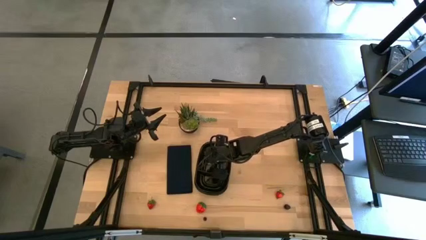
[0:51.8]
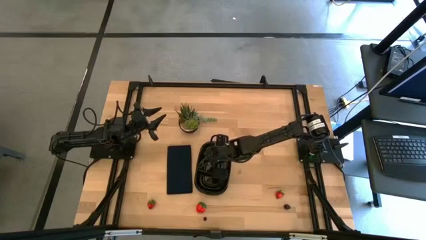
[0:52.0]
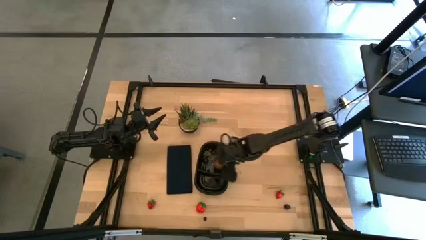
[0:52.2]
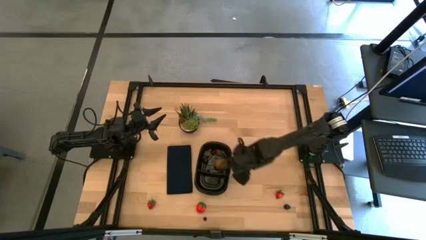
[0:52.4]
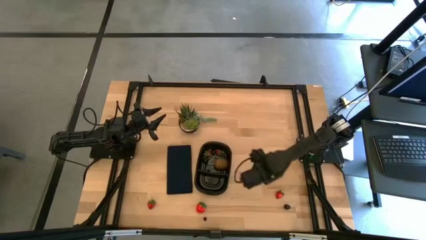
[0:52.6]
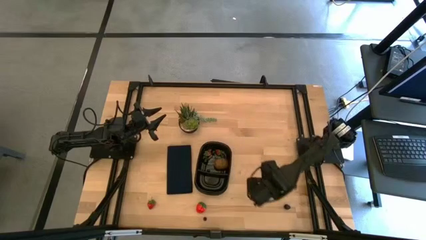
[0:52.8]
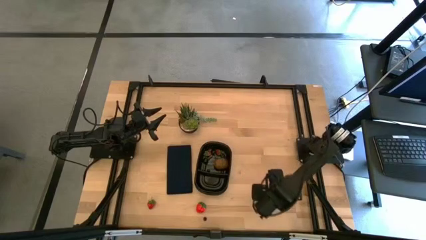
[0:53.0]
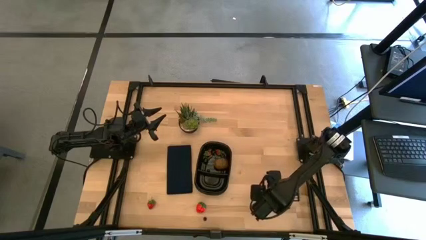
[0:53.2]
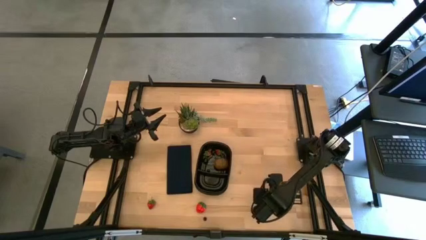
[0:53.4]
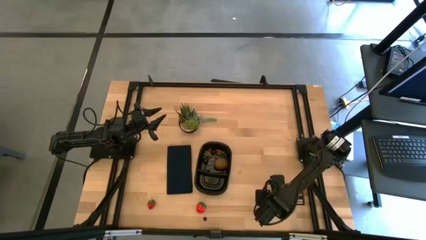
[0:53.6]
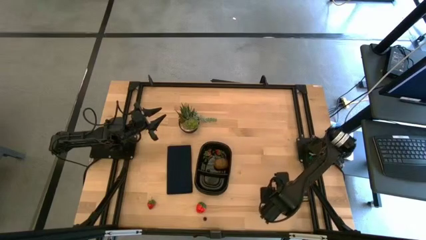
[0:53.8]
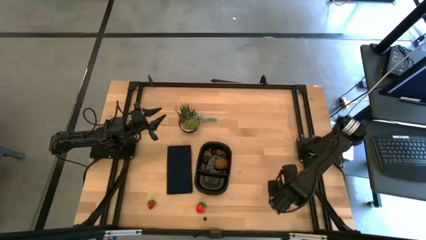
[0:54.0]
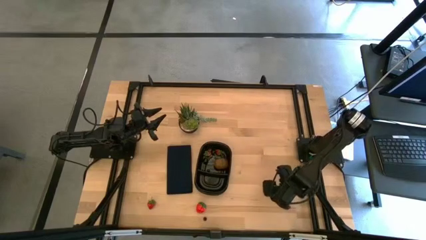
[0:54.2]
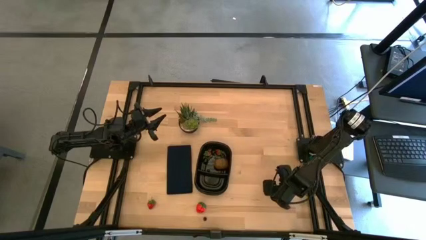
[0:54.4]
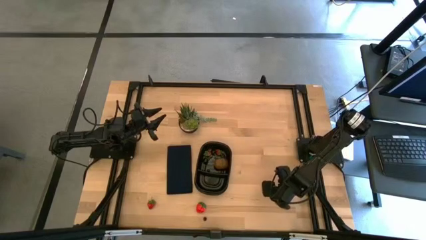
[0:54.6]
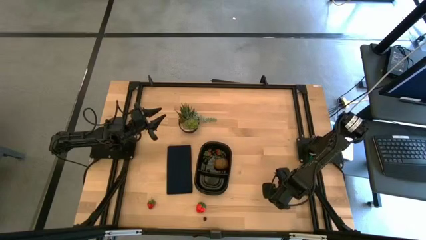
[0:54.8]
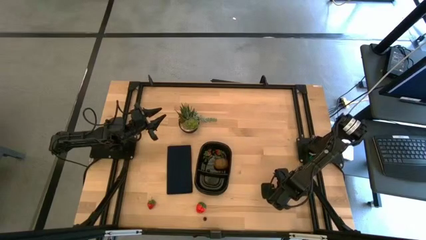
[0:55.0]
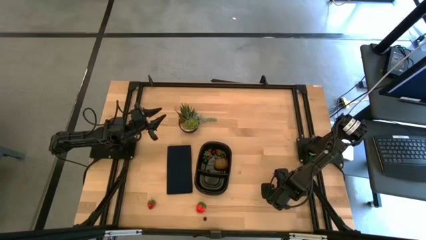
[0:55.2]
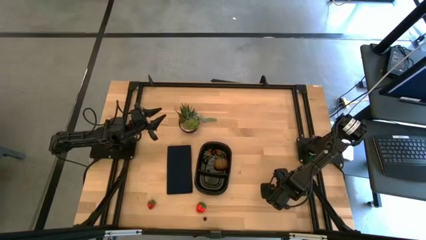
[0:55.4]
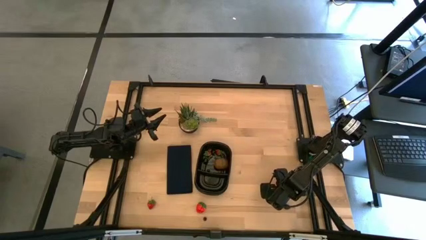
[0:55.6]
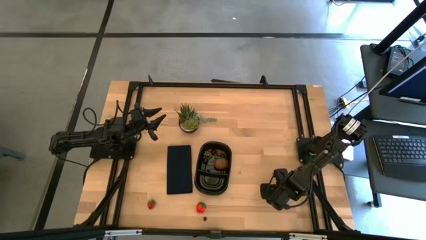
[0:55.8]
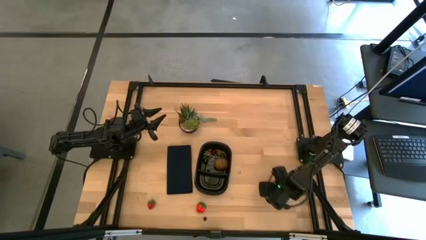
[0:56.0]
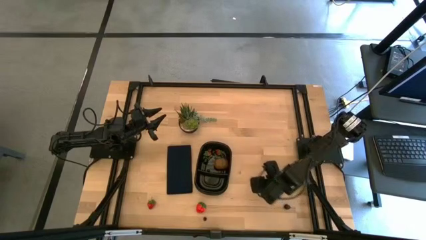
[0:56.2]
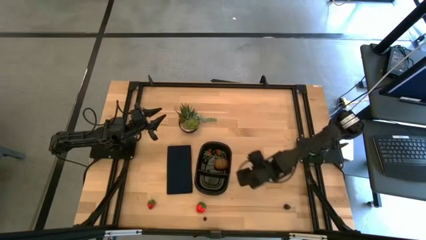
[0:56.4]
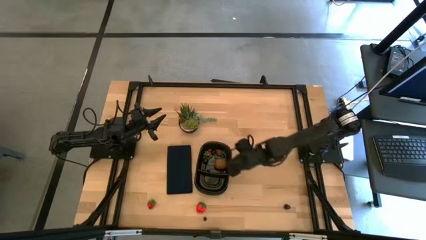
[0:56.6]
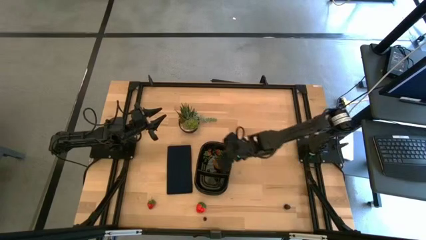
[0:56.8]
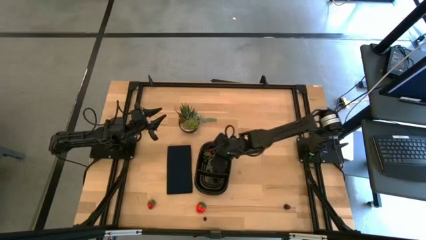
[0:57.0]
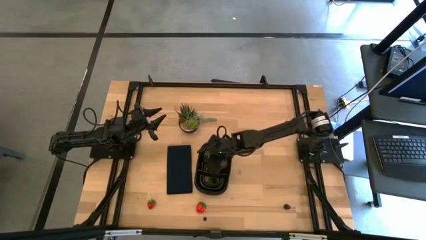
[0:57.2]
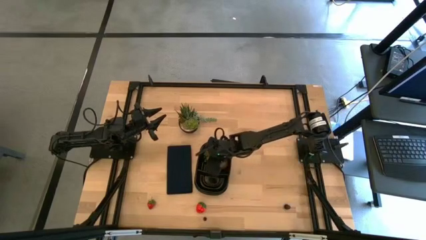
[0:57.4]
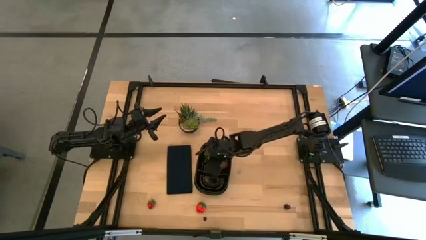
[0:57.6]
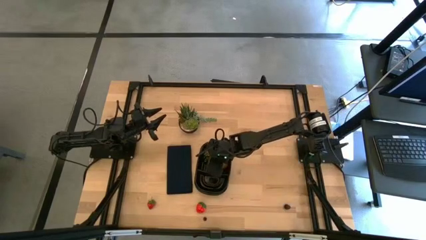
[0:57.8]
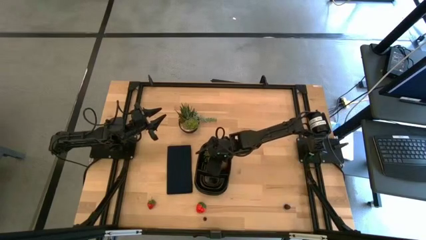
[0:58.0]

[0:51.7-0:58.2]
Task: Pick and placing Produce into tupperware
Put the red strawberry into the black bin

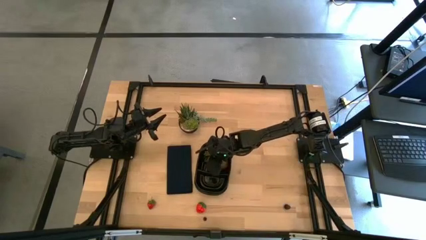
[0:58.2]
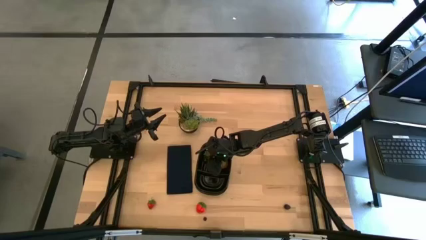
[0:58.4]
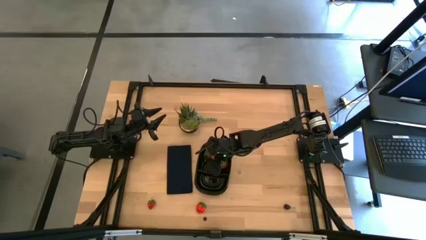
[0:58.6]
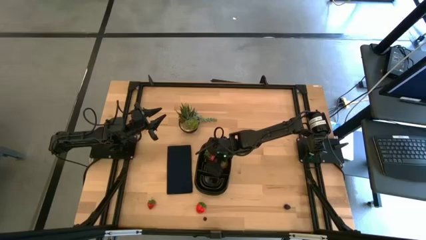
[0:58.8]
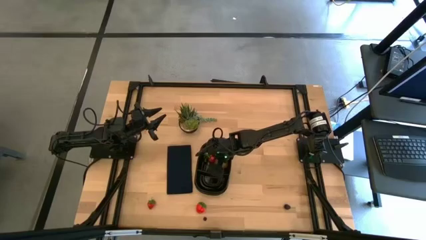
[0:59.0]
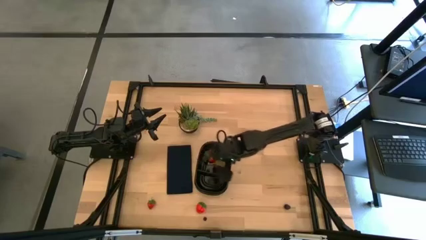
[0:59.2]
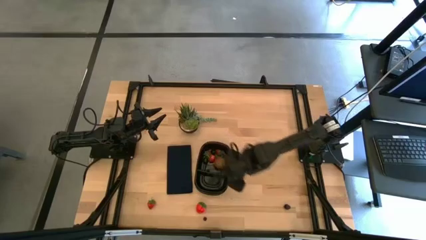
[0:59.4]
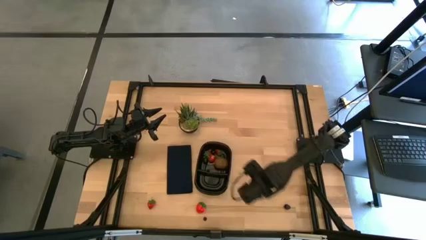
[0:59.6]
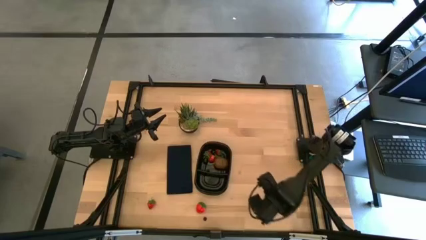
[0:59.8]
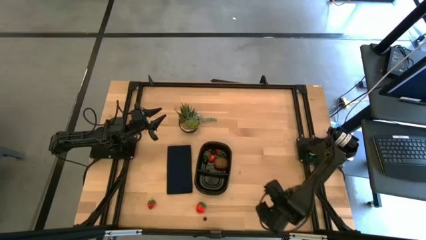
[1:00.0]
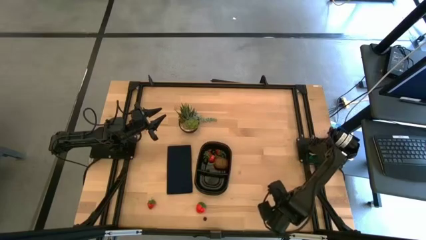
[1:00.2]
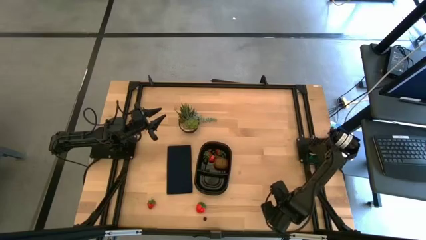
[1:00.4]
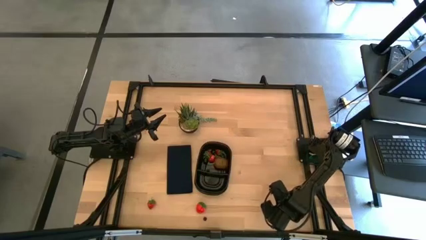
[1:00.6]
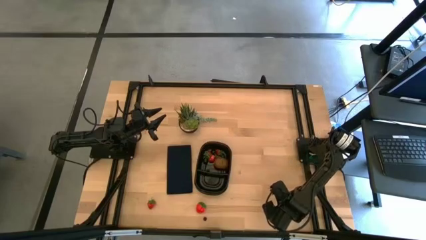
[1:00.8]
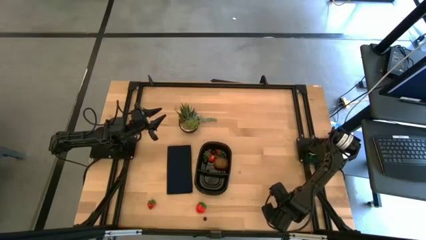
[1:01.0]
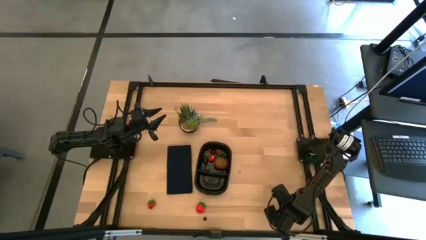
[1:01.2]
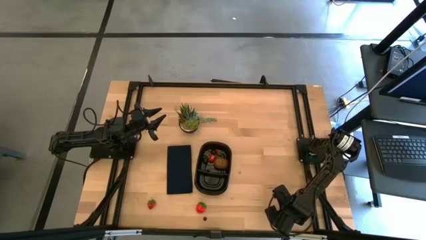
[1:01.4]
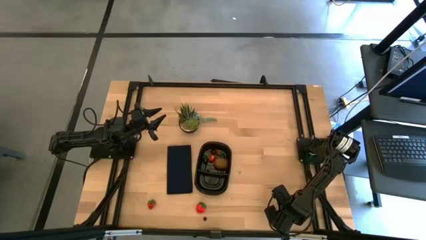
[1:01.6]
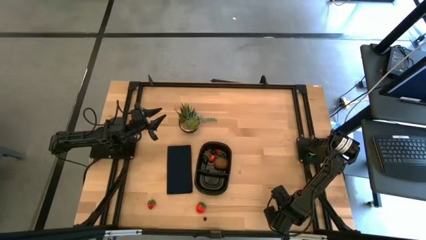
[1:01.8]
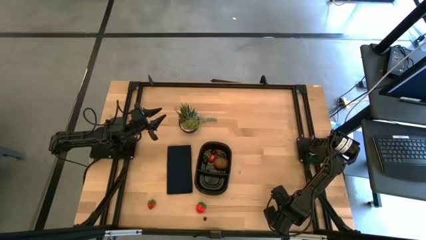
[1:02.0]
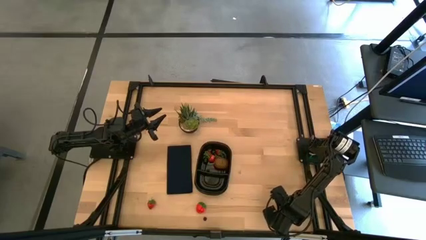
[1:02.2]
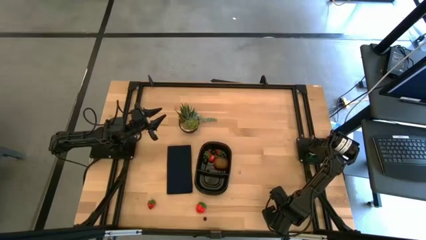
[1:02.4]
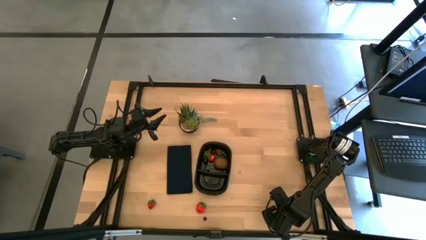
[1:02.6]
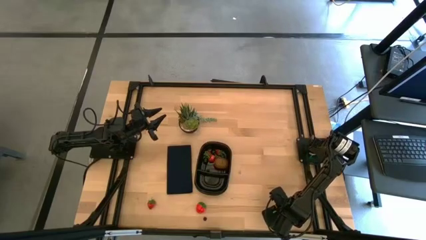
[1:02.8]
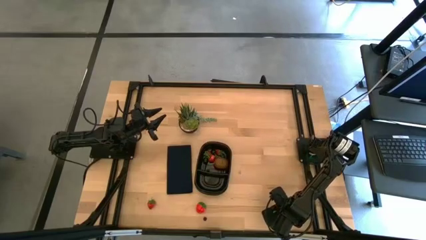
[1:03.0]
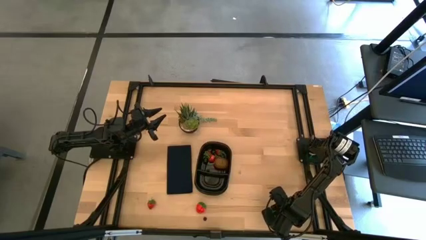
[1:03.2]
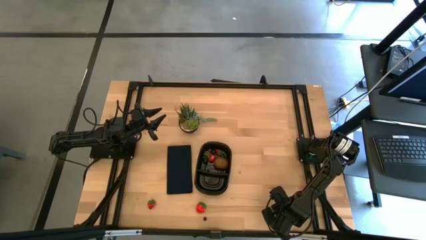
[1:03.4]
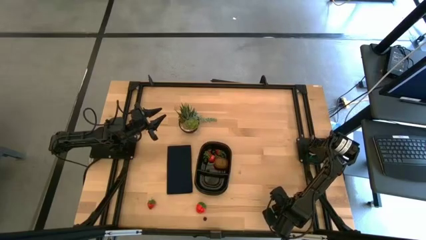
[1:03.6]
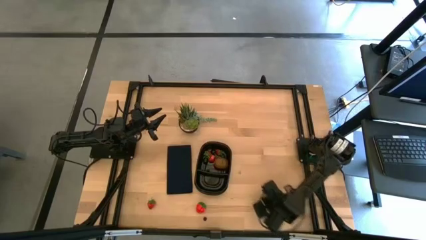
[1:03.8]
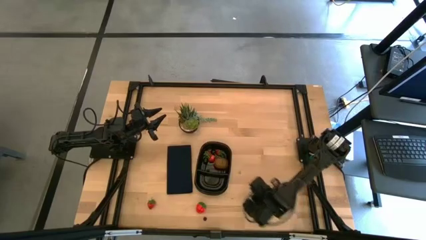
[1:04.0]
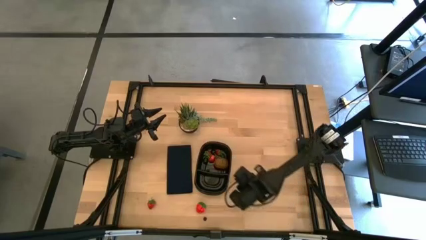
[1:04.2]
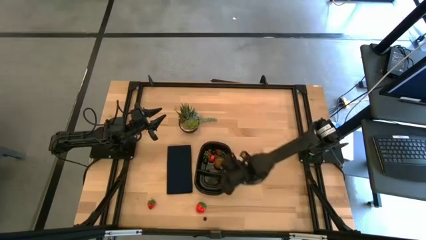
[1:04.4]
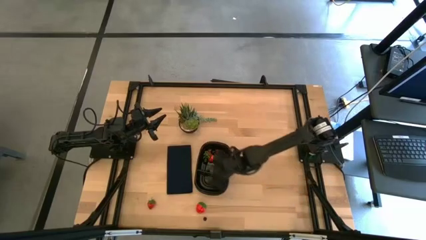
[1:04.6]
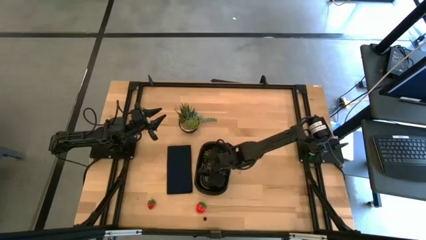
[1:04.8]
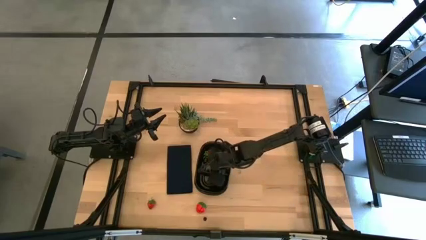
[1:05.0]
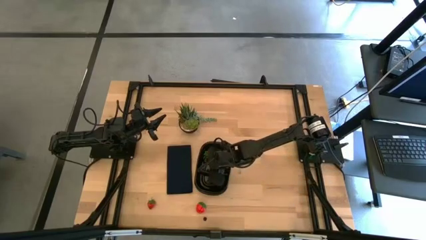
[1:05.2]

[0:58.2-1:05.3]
Put the black raspberry into the black bin

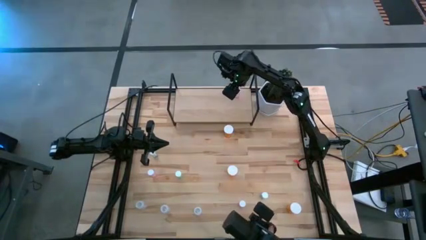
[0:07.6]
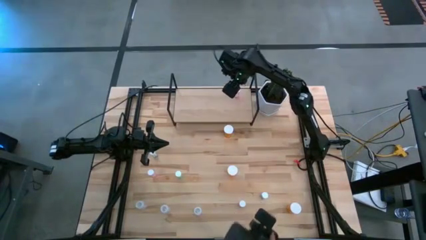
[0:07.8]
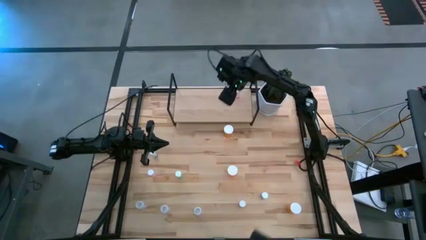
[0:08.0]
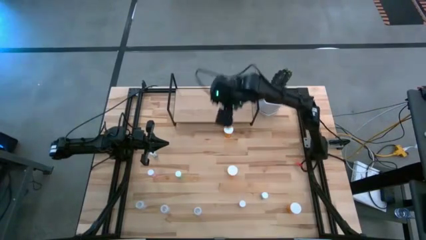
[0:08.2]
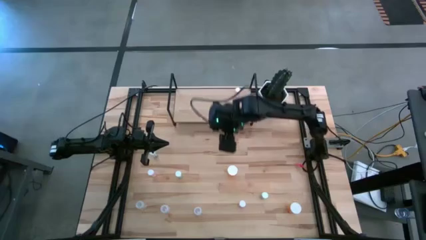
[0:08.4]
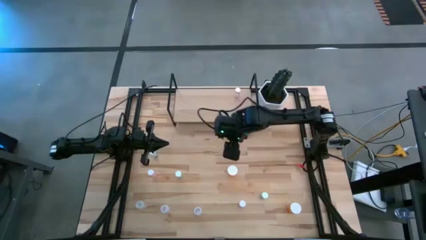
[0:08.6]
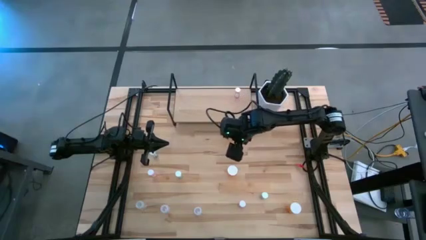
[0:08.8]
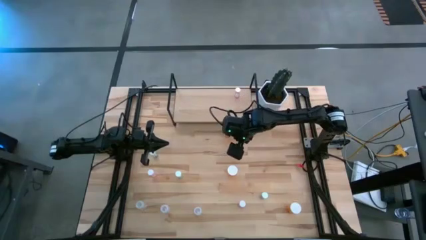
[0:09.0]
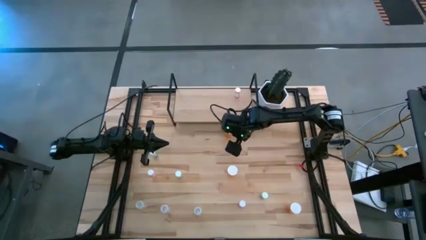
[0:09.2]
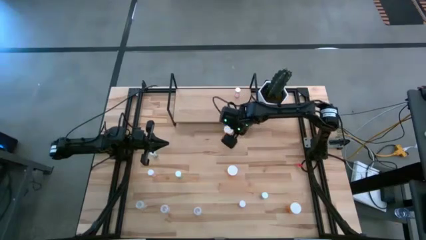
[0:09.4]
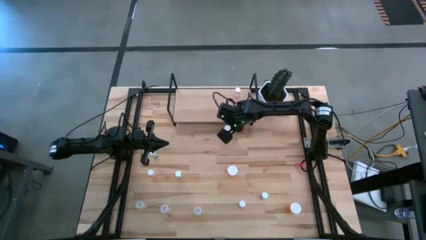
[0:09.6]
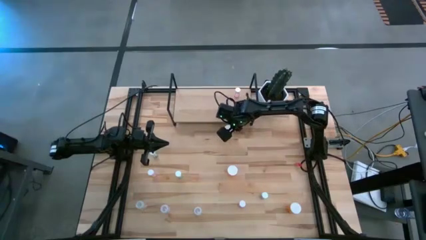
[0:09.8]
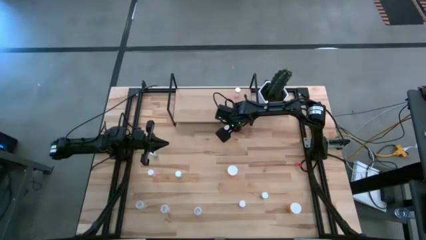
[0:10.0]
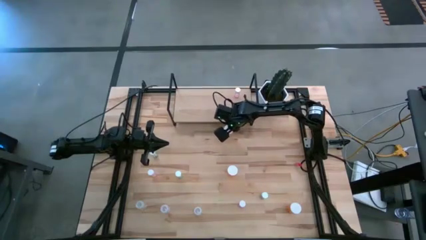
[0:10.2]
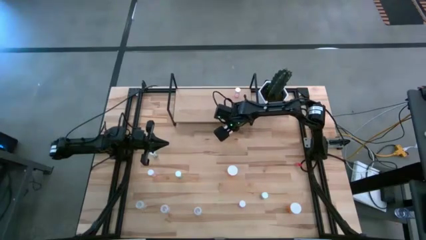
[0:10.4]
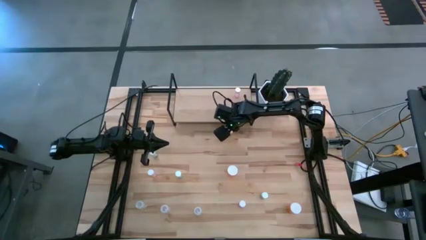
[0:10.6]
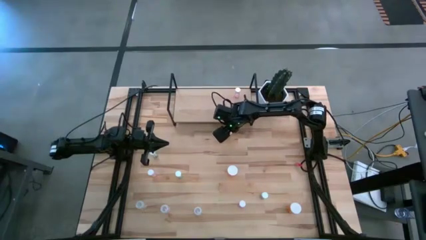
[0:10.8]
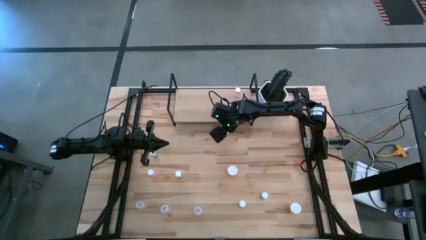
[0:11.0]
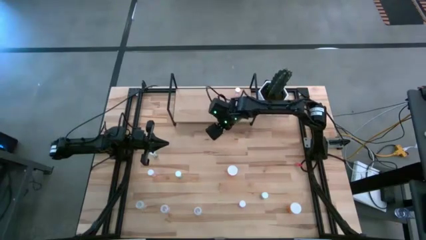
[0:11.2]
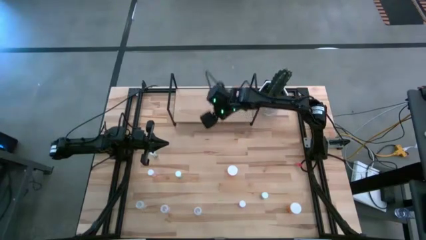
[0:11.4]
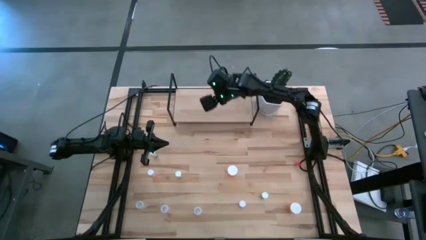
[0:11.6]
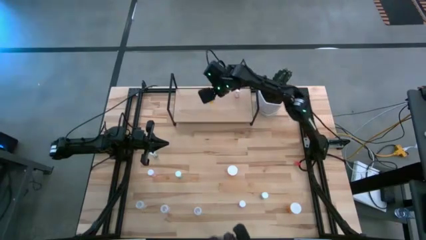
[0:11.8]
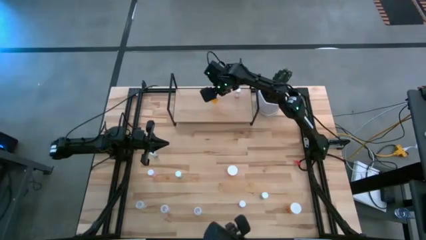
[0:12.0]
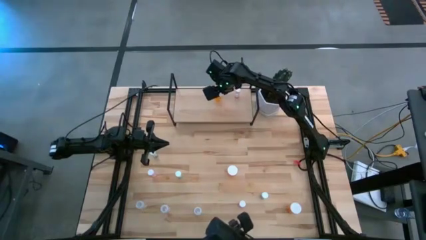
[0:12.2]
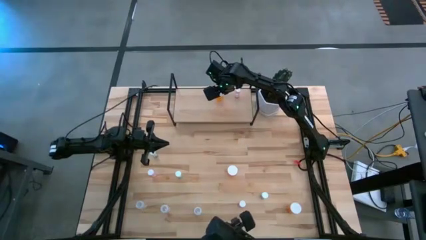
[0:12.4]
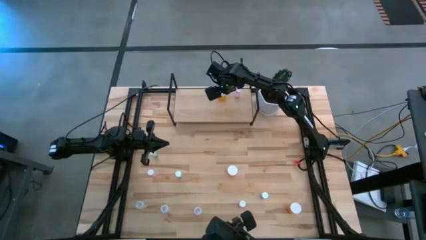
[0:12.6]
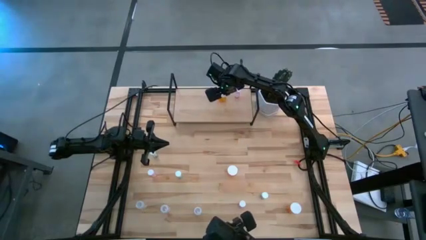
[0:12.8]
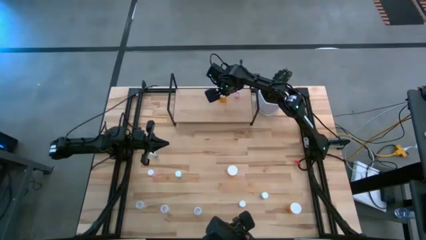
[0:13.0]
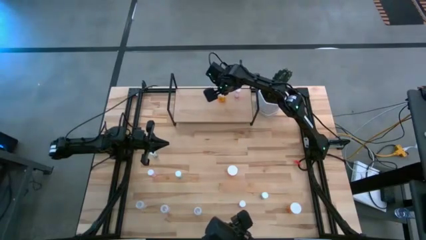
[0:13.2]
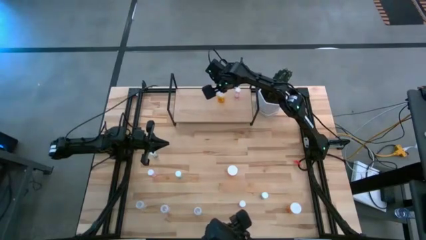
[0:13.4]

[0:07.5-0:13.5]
Task: Pick and place medicine bottles onto shelf by color
Put the top orange pill bottle on the shelf
